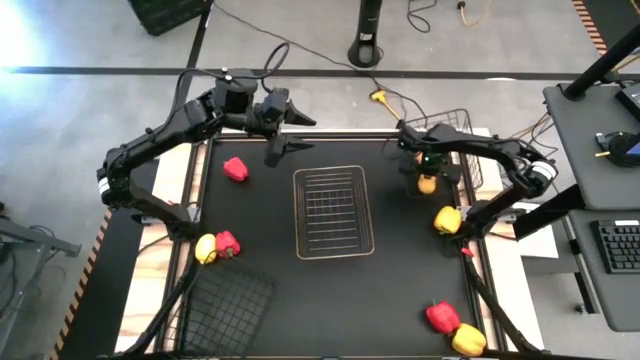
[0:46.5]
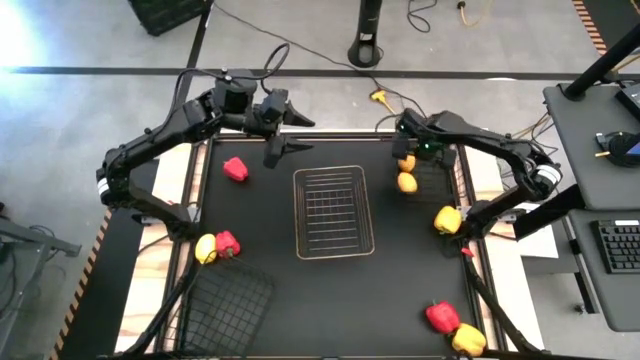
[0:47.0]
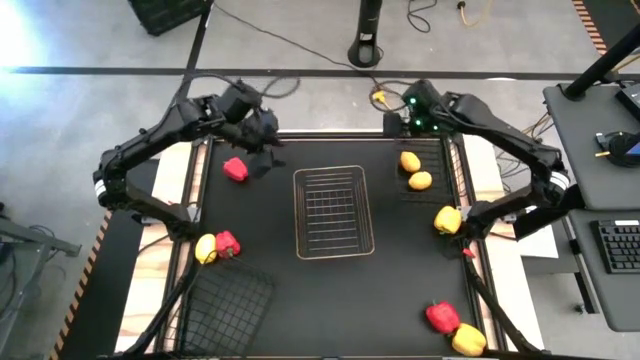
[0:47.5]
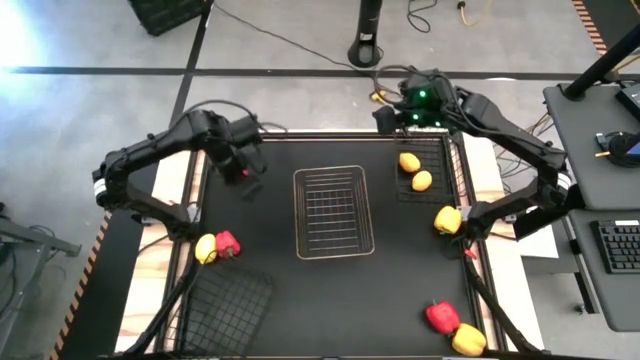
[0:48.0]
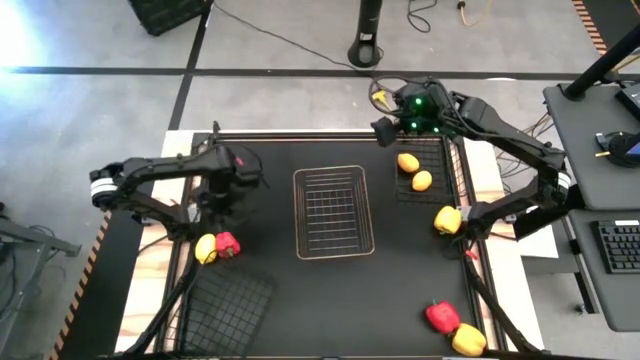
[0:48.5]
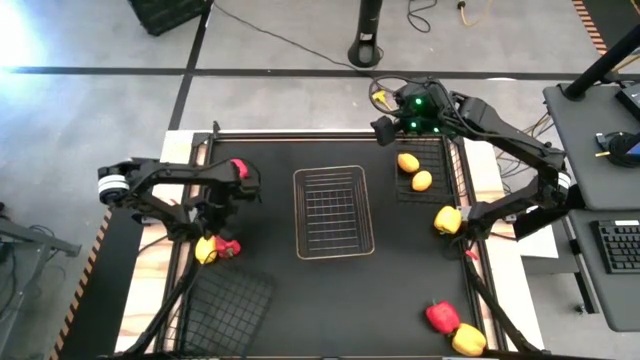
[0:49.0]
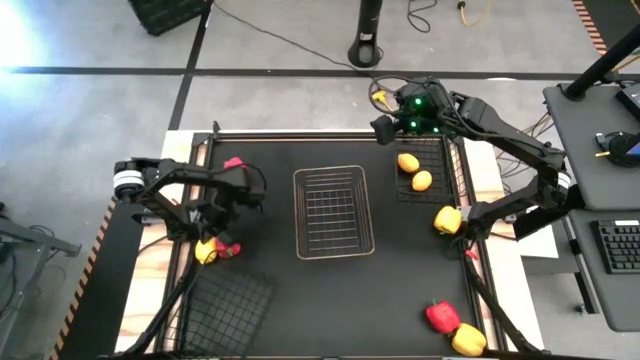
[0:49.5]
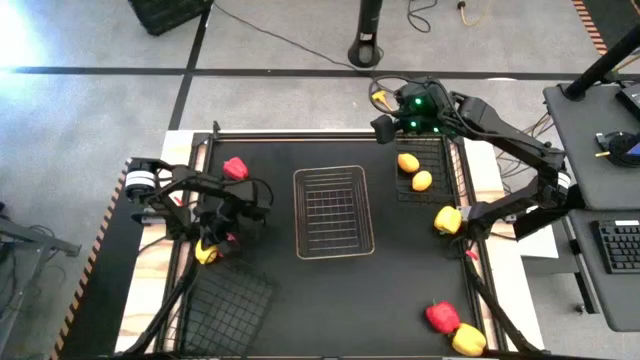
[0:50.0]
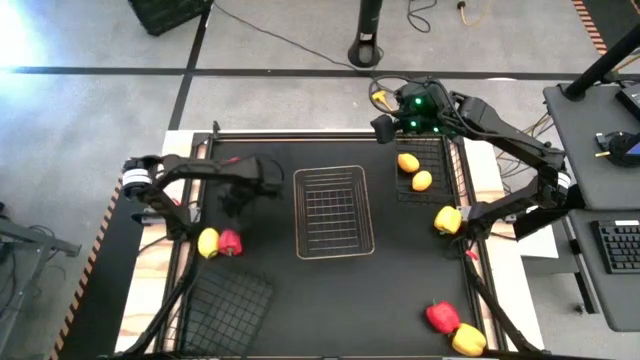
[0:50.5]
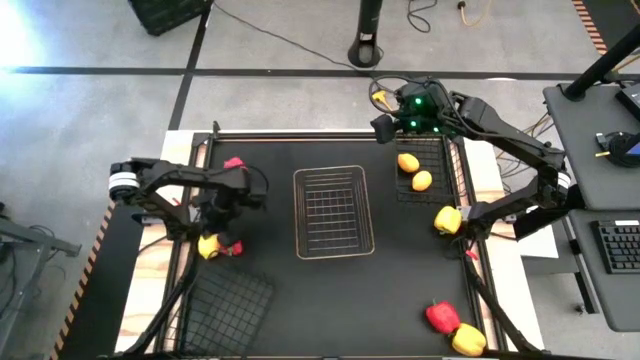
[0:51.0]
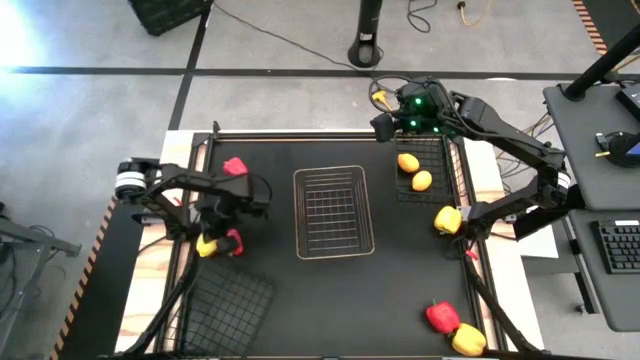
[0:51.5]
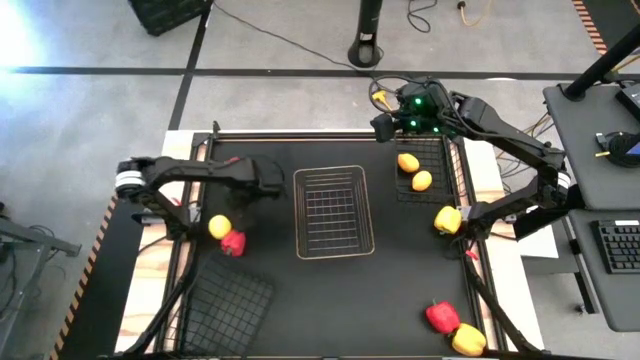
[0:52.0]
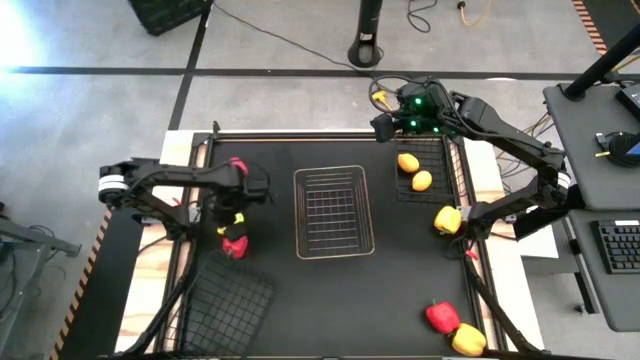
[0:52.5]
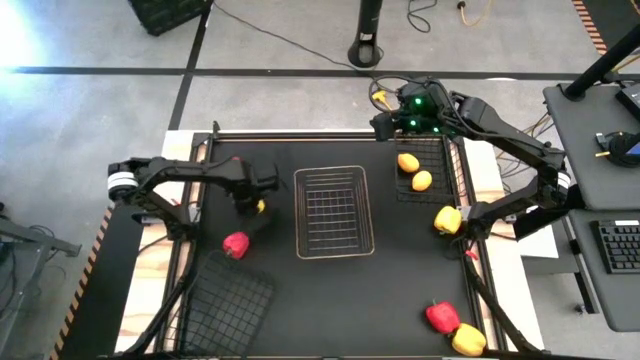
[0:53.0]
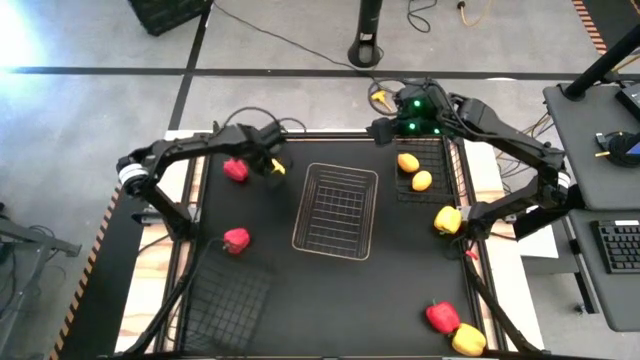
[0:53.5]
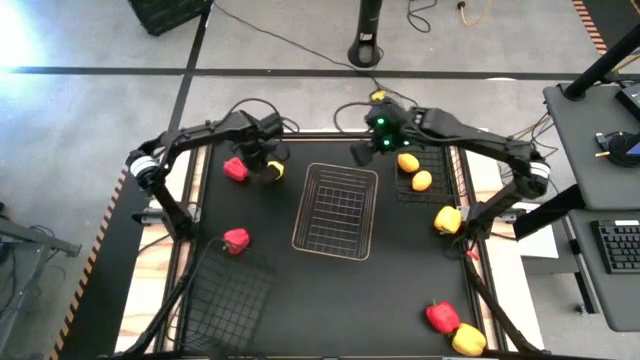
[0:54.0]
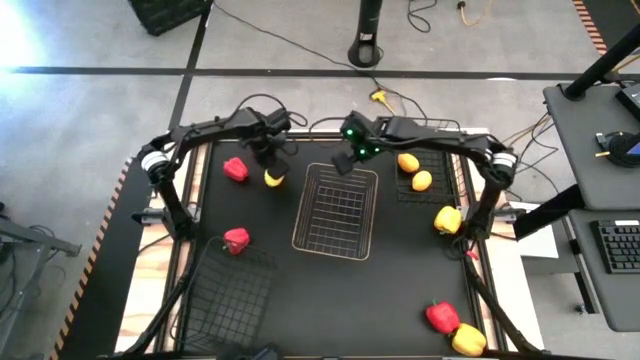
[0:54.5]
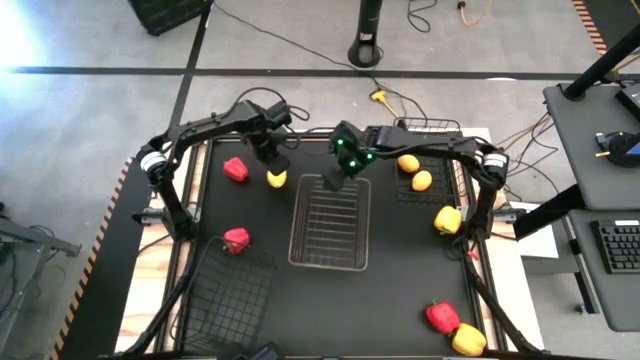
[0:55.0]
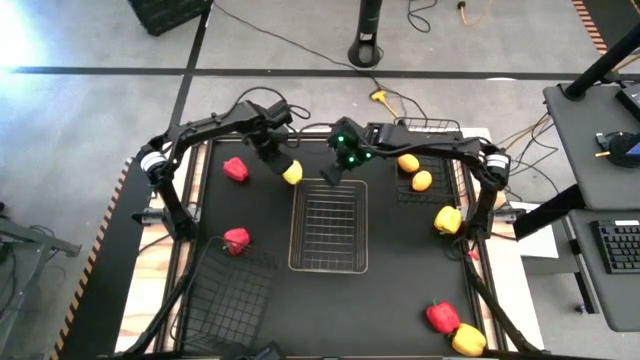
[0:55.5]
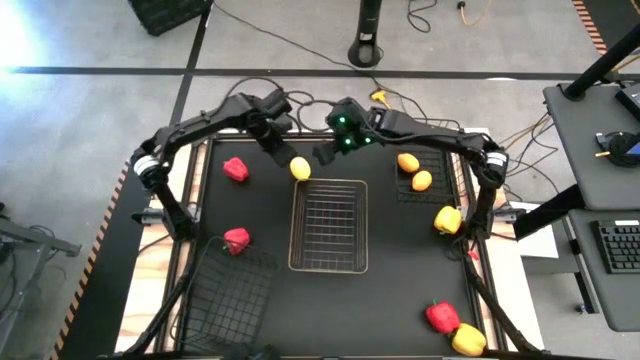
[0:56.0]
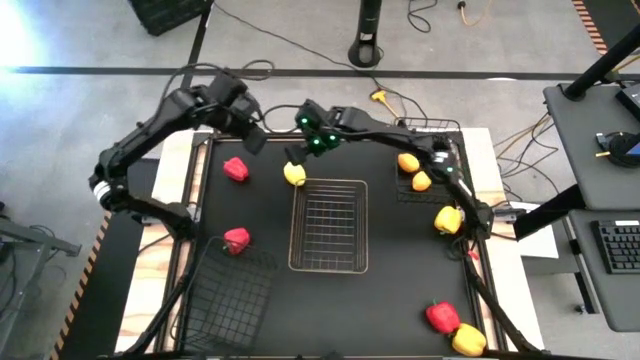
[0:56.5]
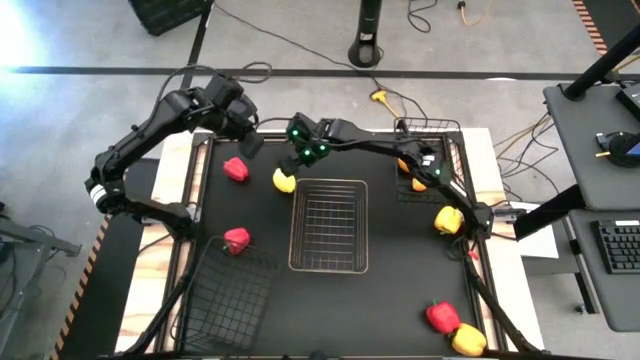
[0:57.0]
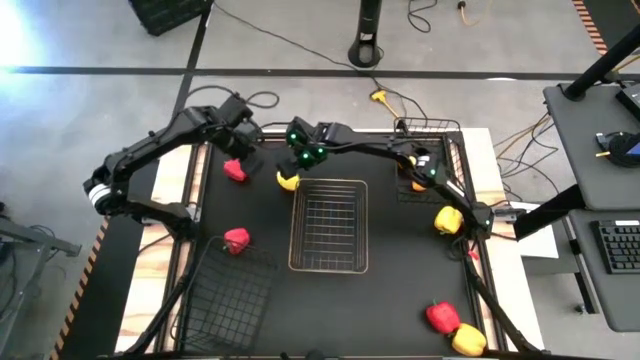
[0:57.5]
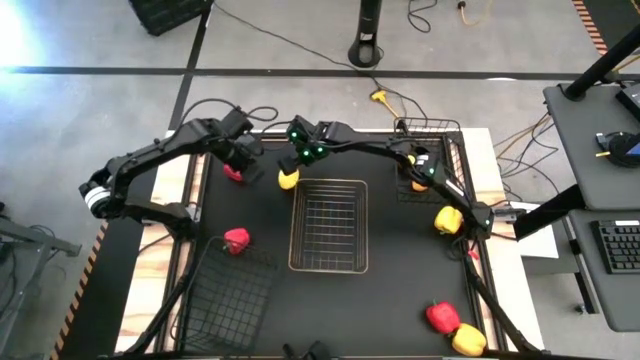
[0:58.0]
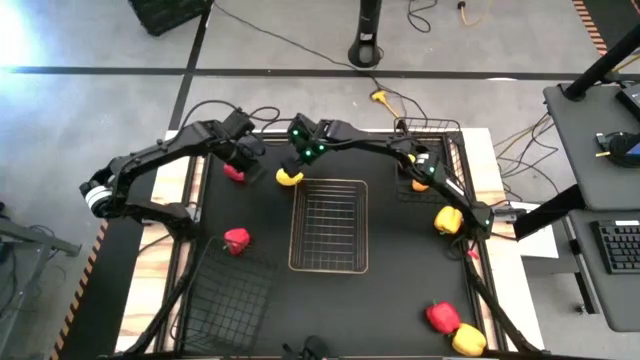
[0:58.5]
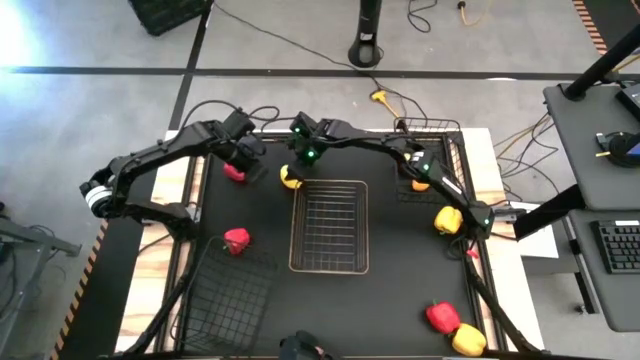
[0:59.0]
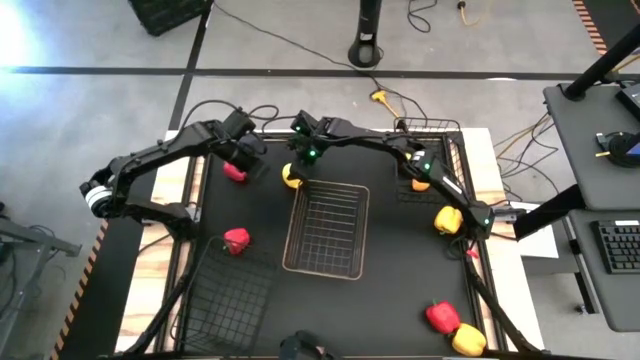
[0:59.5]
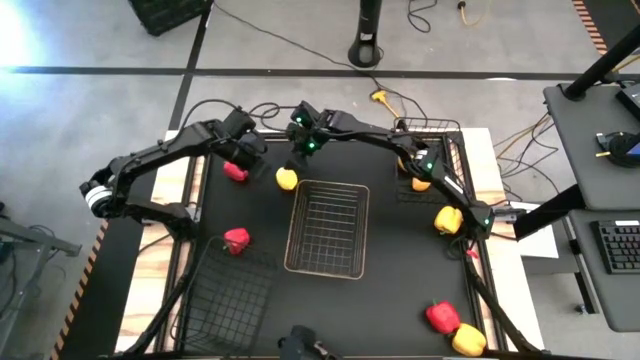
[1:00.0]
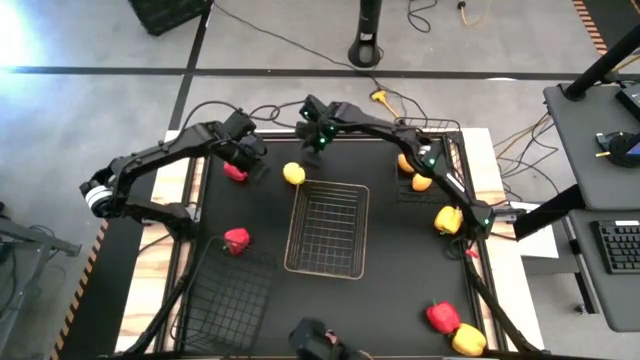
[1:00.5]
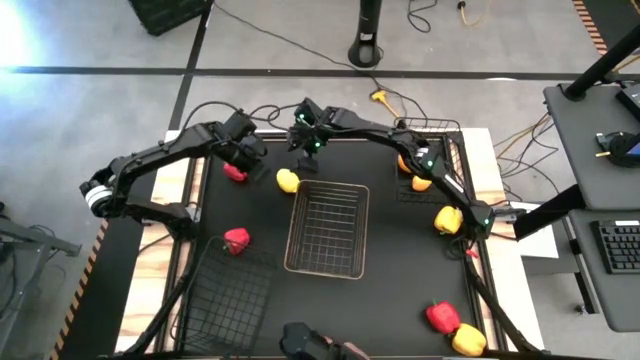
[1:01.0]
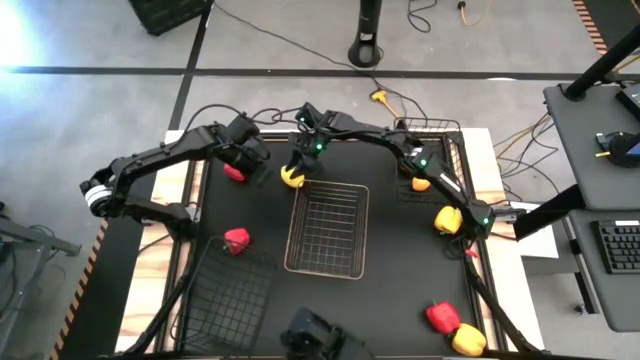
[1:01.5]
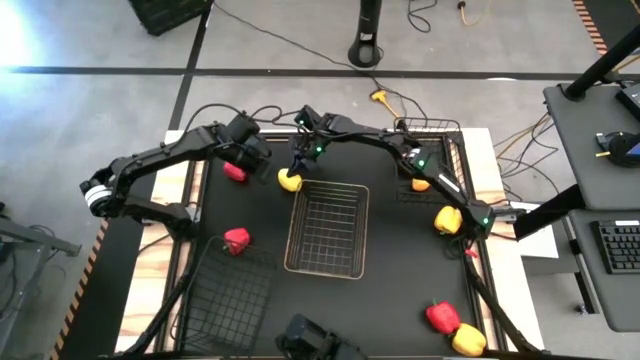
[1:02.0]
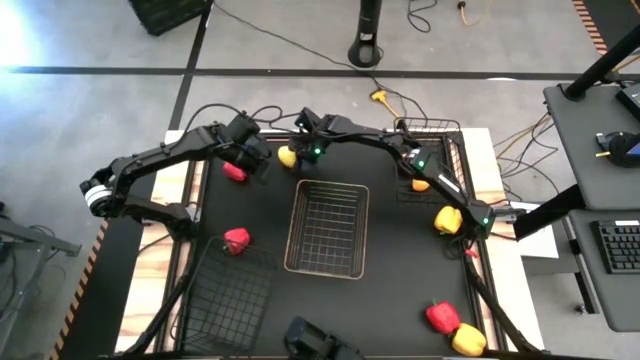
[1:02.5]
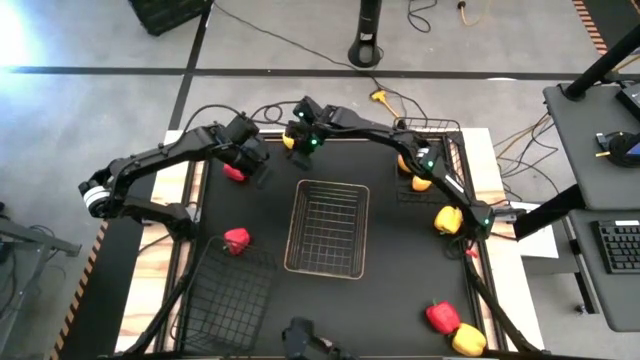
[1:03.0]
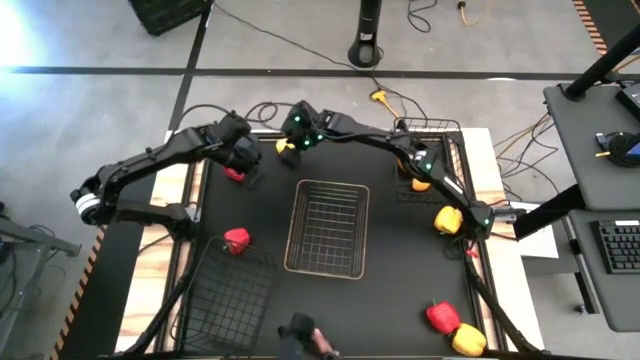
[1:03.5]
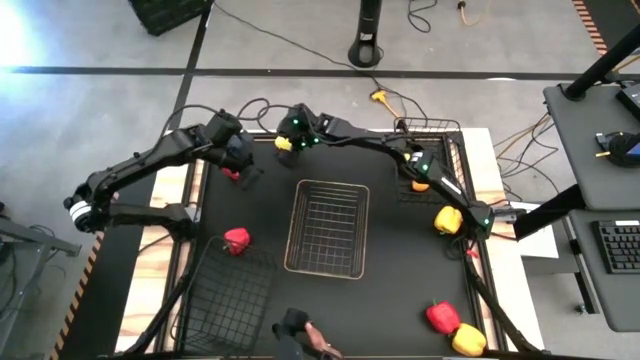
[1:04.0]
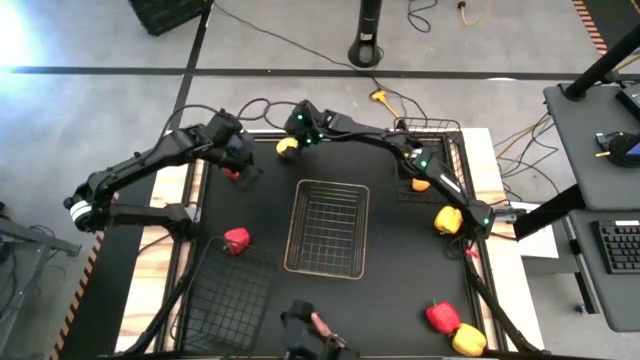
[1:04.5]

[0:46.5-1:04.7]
Task: Sort produce into baskets
Put the lemon into the top black wire basket

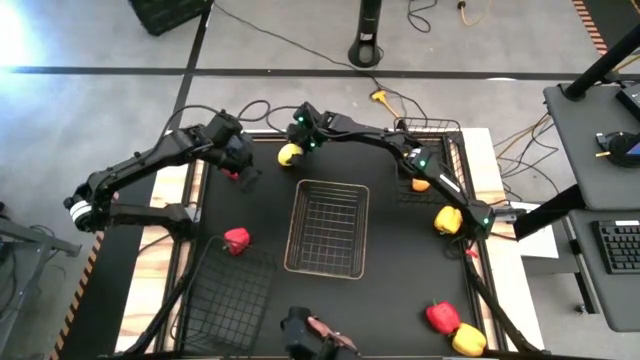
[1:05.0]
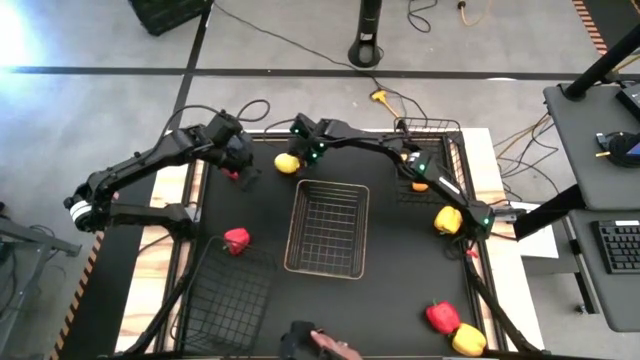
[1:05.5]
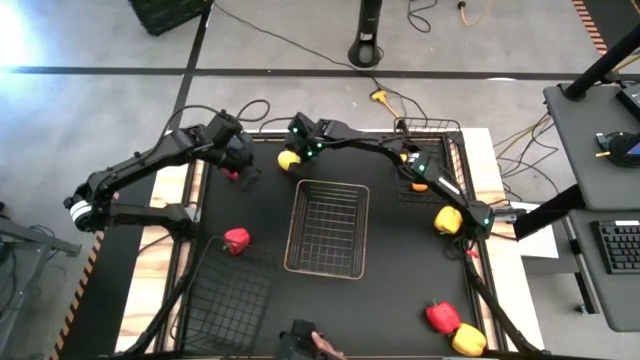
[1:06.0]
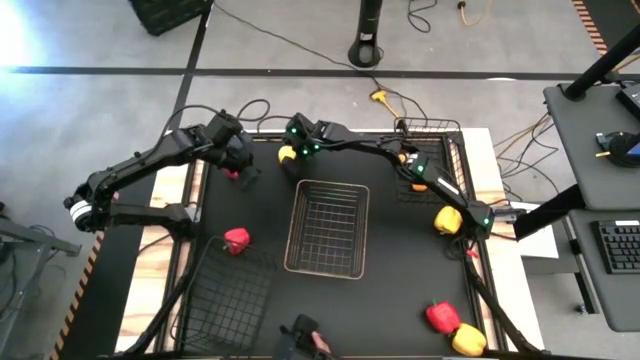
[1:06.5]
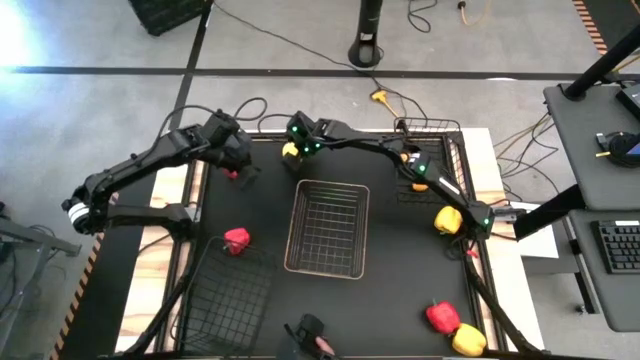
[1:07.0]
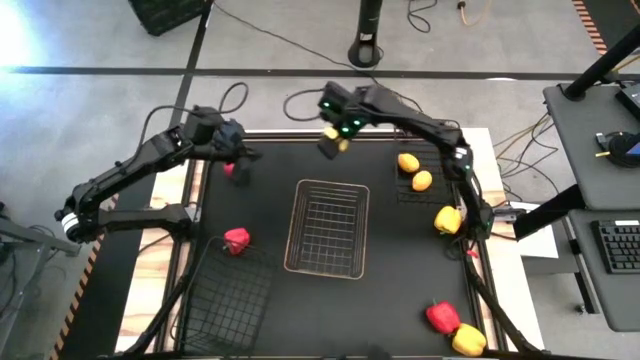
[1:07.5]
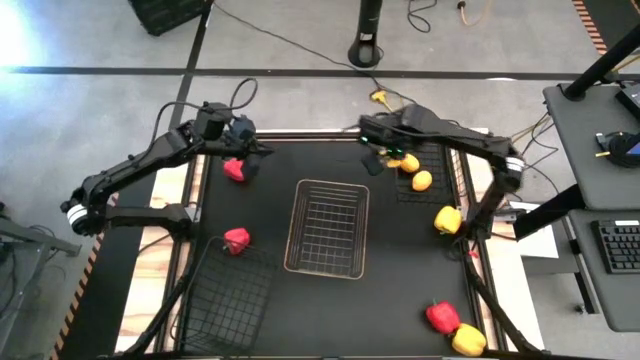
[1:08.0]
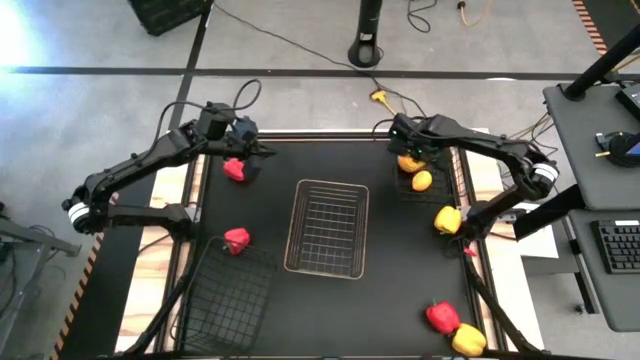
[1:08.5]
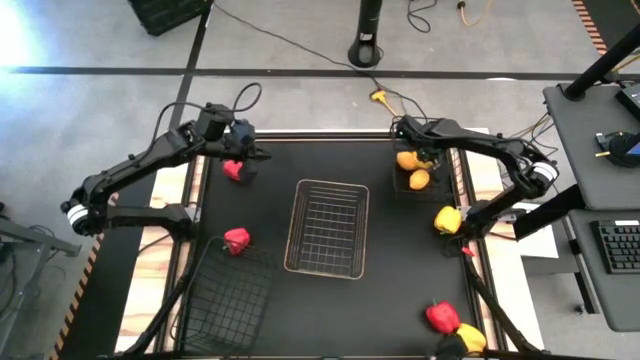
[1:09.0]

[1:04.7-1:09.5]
Put the lemon into the top black wire basket
